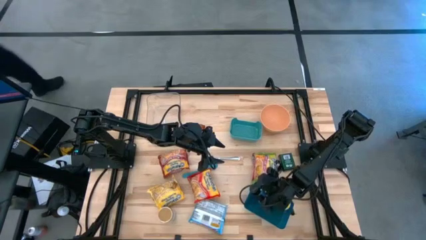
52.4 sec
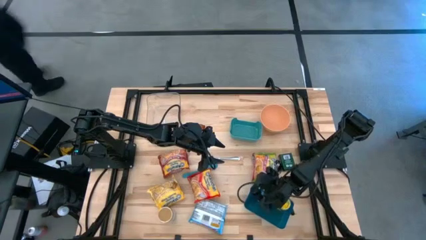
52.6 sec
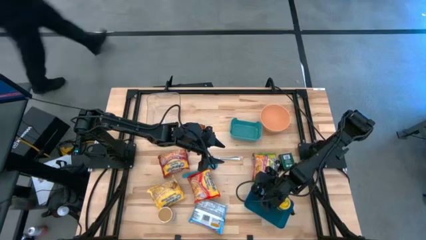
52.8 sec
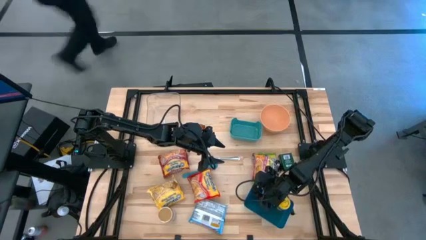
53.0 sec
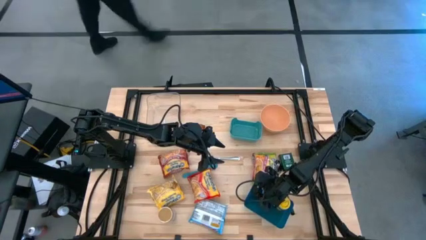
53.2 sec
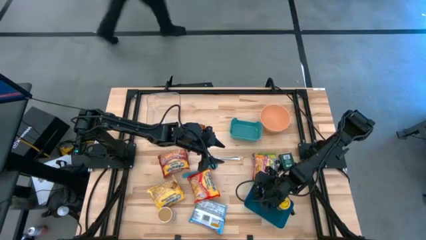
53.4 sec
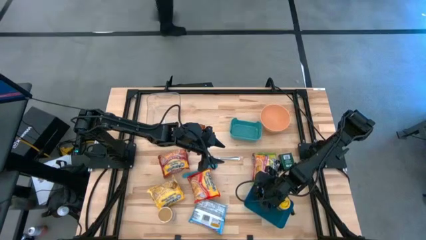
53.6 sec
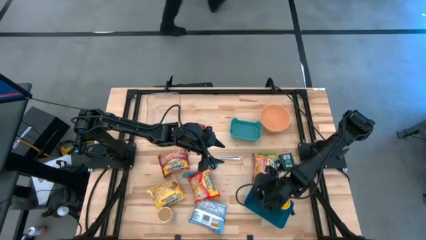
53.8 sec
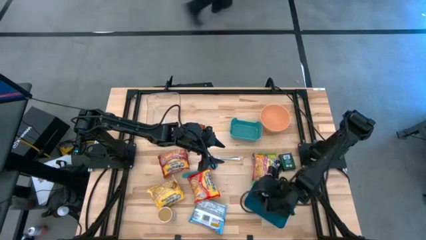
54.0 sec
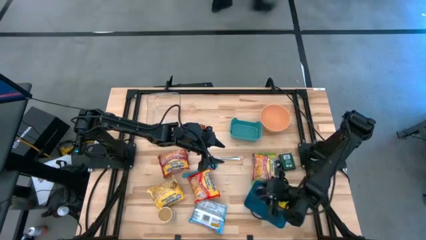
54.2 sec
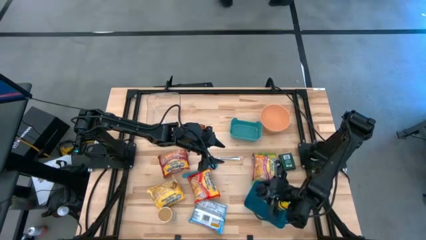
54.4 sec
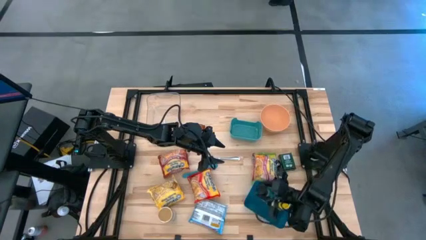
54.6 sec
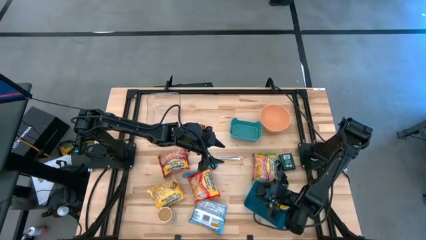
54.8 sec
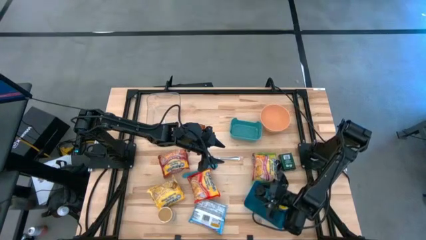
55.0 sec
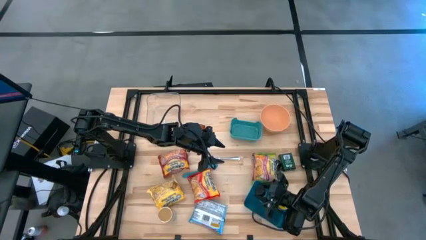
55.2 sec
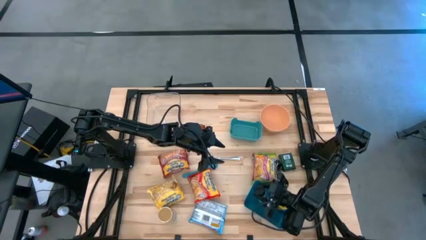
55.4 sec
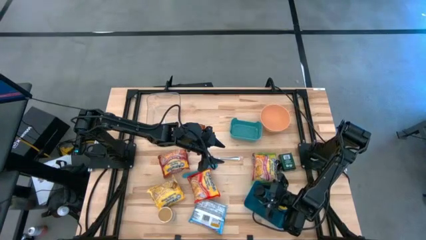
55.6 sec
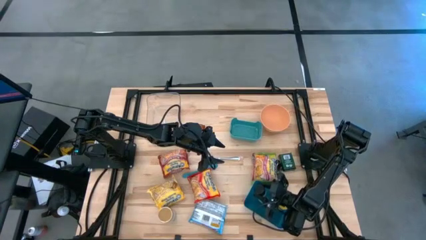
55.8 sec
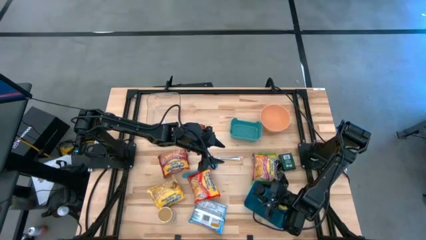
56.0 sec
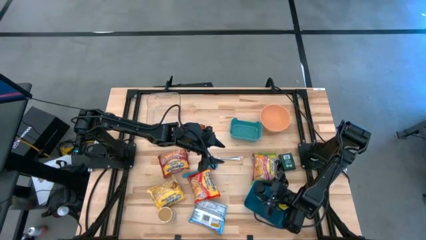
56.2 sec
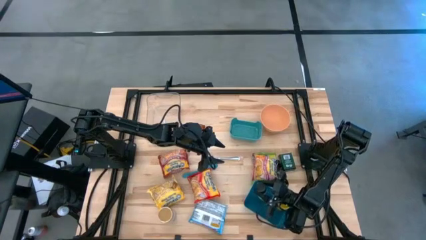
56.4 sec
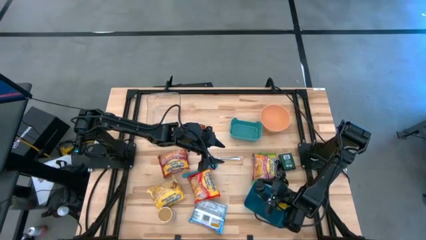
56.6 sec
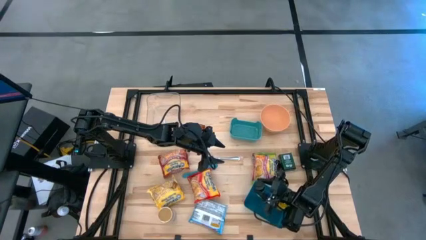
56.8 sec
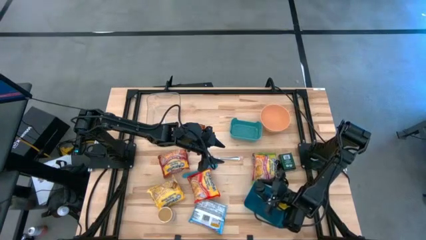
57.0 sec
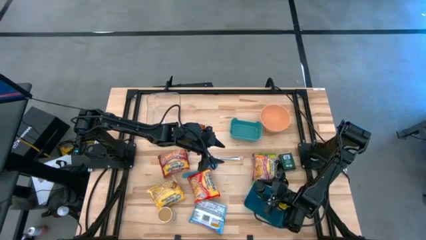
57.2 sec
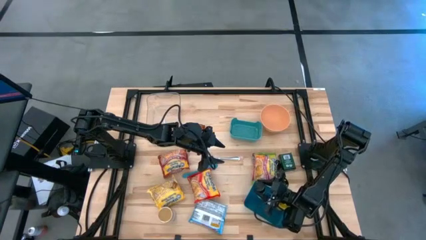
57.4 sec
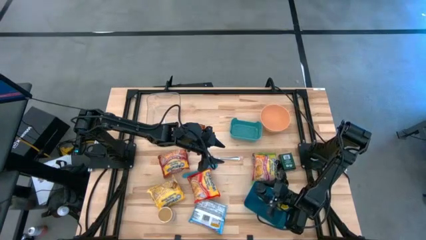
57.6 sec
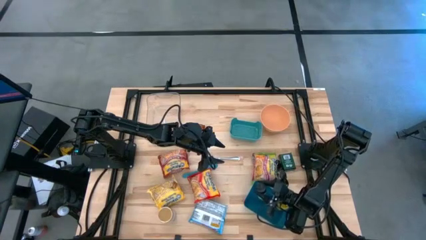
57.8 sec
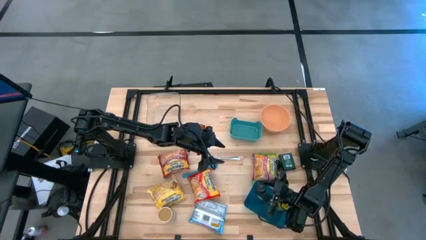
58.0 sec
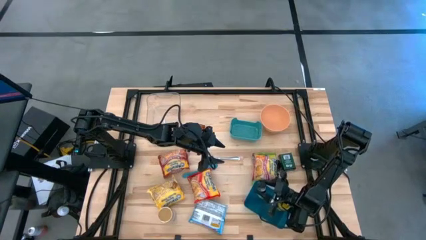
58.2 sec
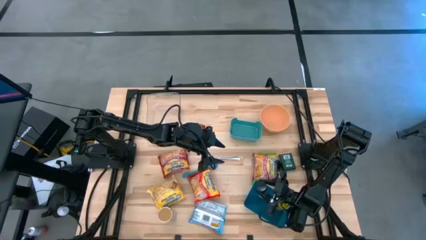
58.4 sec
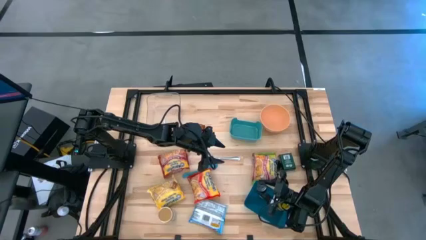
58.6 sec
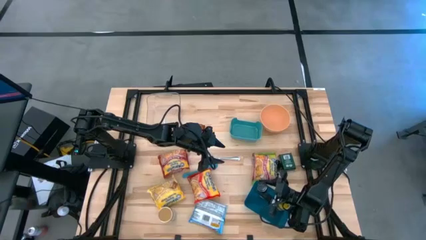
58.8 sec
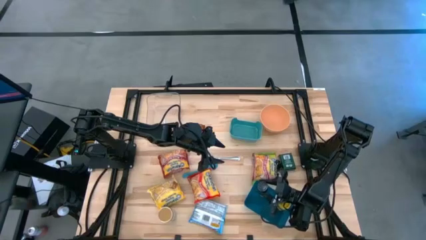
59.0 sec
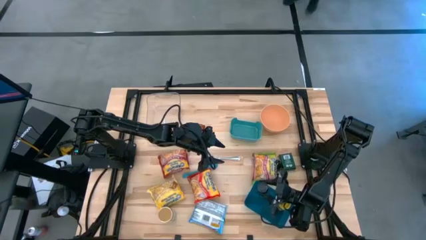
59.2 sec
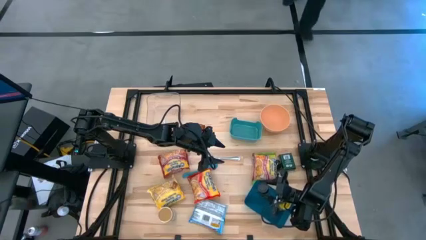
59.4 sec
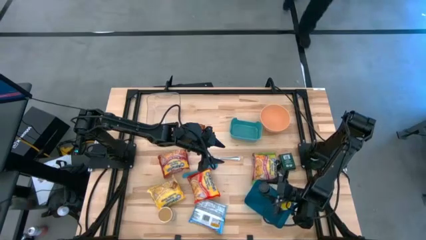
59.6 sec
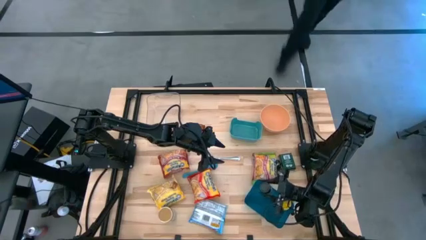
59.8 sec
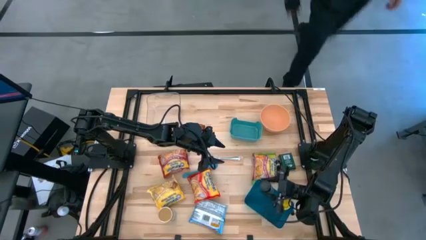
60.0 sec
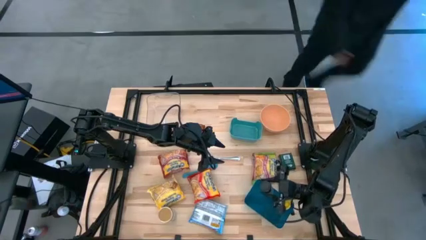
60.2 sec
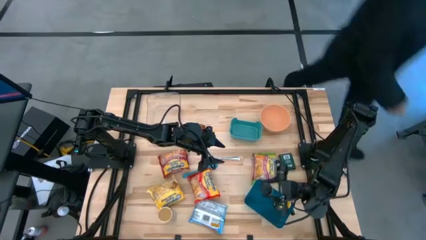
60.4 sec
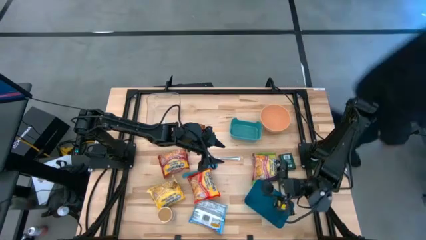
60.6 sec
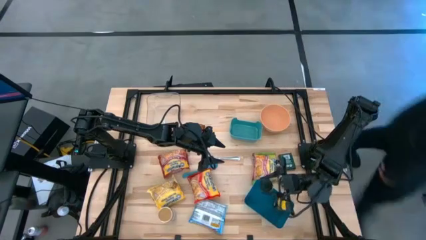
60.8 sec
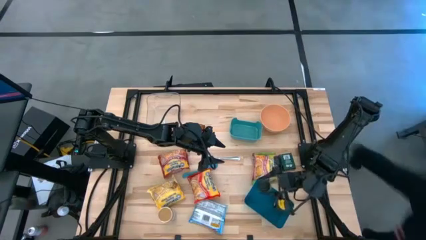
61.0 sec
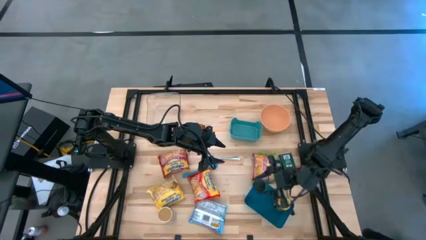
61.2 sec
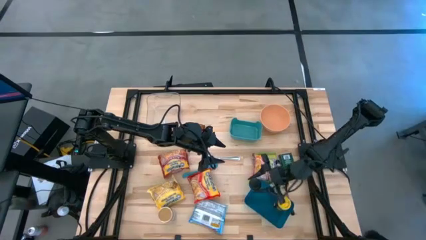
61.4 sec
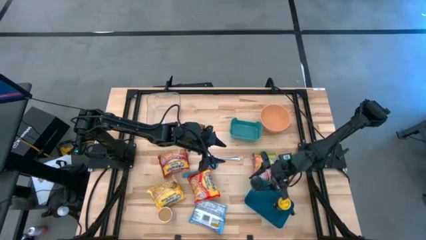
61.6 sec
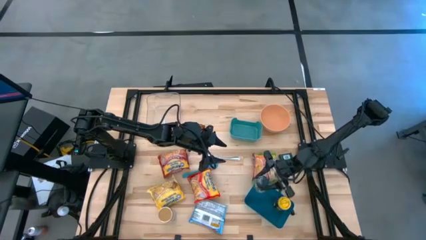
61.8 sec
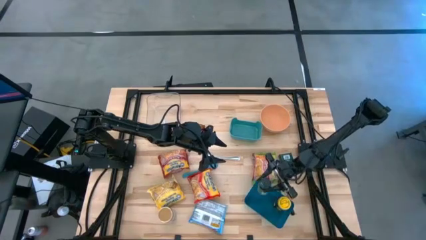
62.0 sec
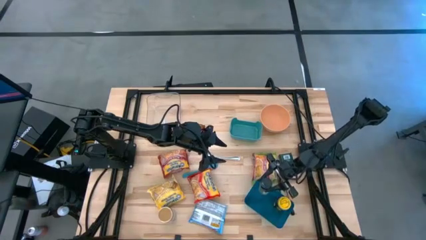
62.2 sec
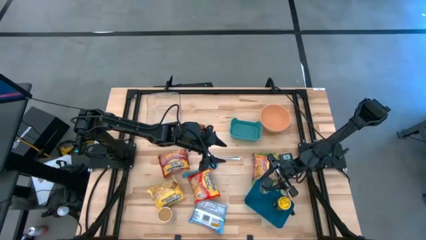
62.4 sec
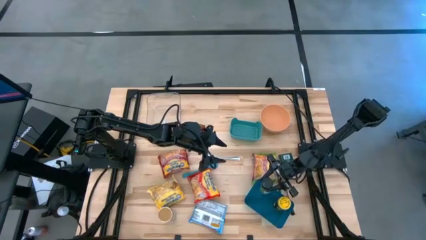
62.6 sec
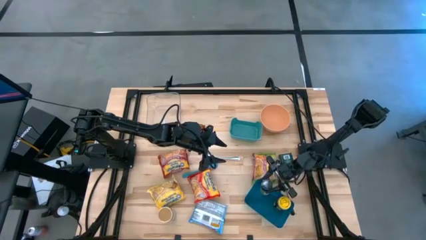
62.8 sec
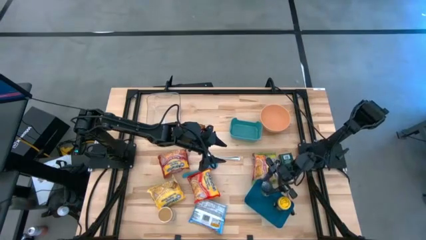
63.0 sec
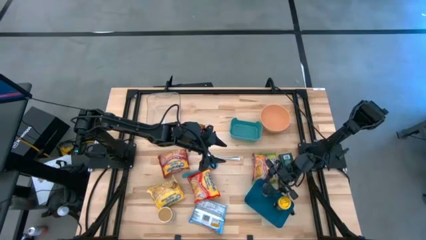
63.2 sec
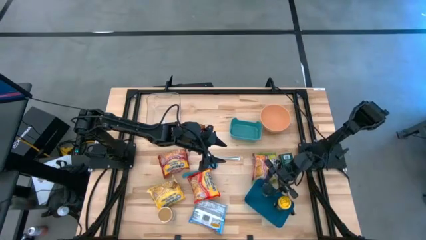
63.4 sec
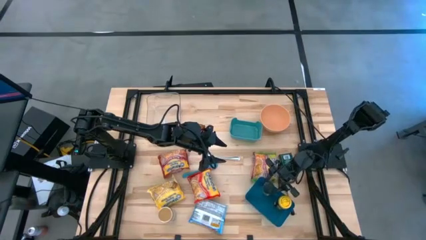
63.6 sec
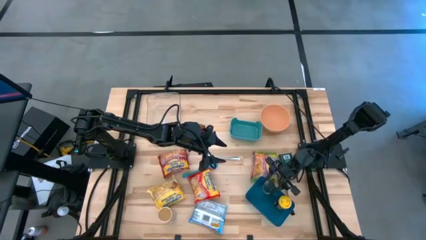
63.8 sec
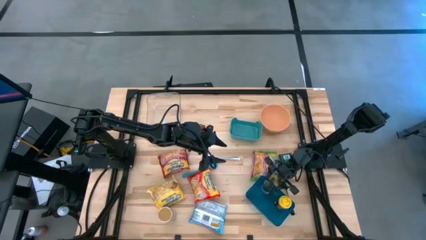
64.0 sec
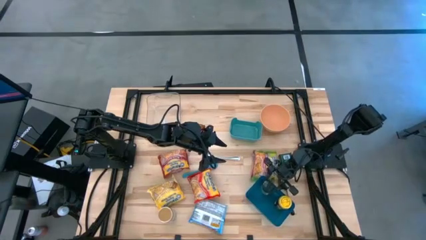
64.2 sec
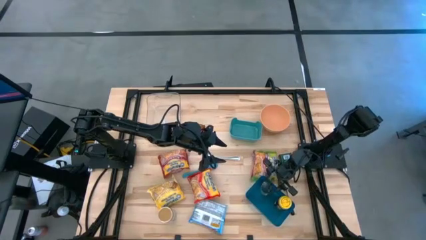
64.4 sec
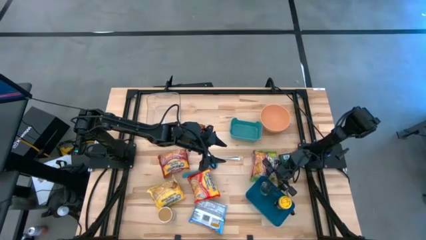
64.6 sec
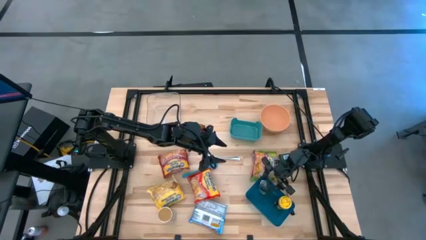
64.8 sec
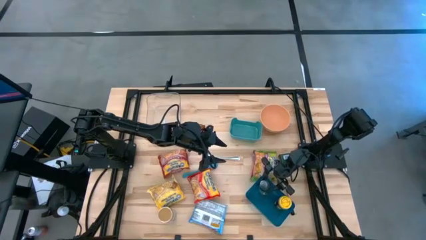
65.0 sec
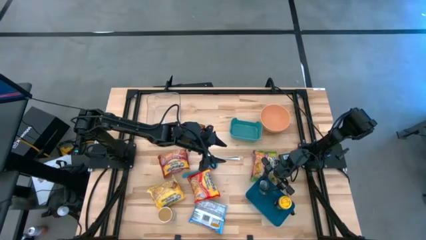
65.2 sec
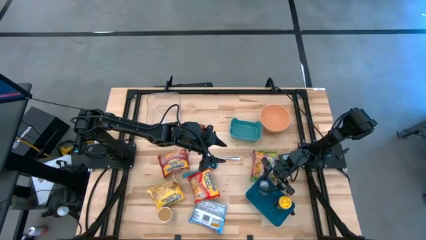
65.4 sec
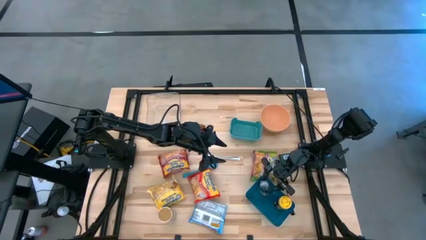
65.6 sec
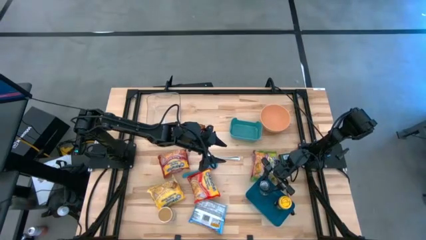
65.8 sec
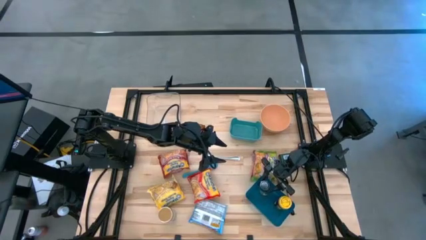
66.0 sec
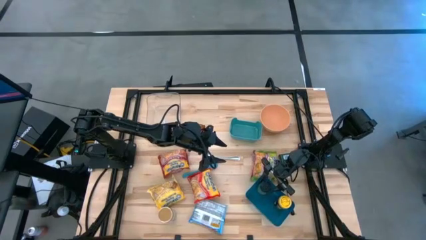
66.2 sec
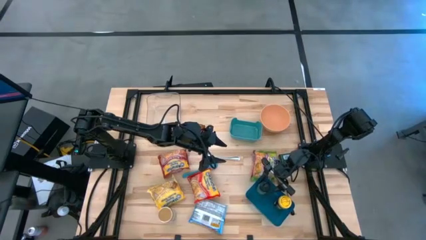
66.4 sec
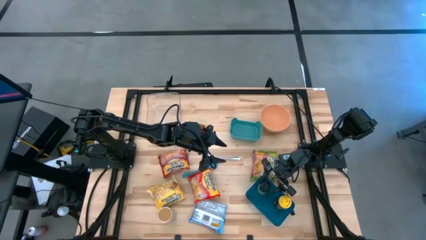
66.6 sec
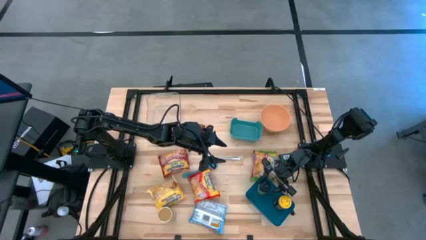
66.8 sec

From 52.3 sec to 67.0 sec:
Task: Pick & Place Food Item
Put the black seasoning bottle into the blue bin

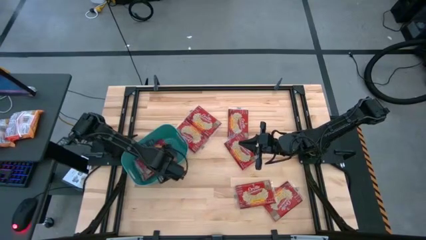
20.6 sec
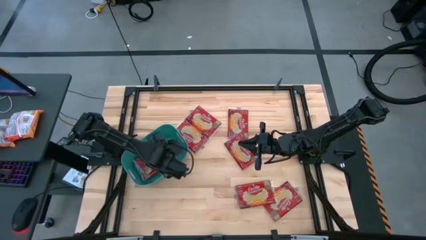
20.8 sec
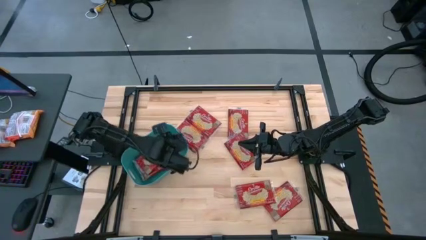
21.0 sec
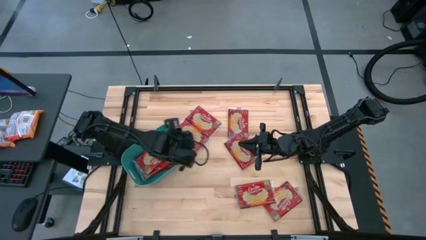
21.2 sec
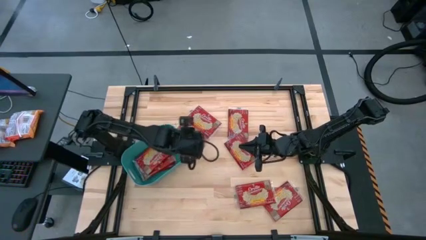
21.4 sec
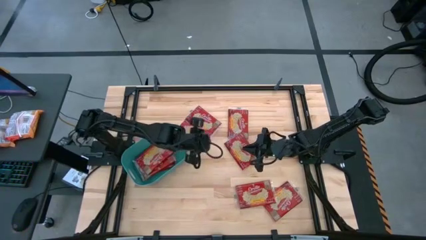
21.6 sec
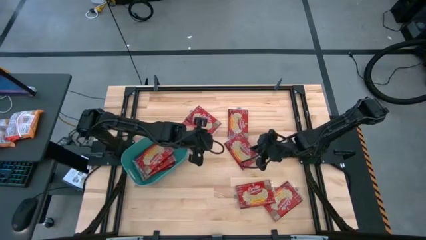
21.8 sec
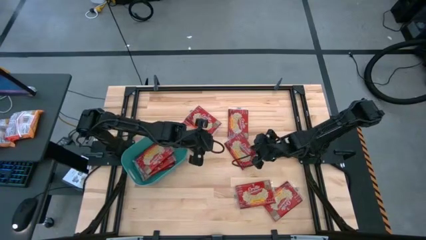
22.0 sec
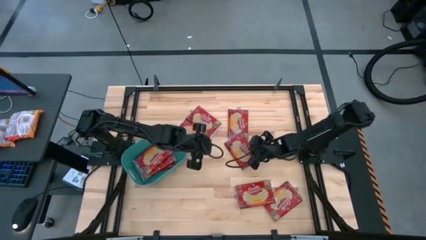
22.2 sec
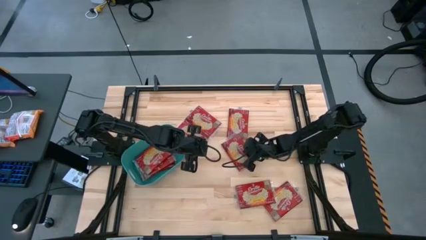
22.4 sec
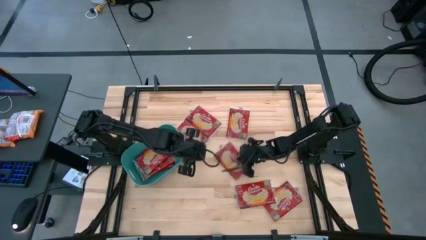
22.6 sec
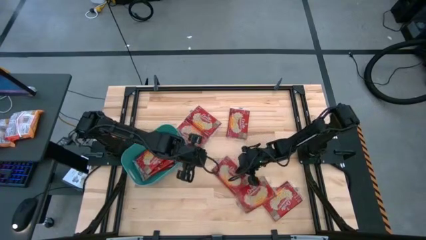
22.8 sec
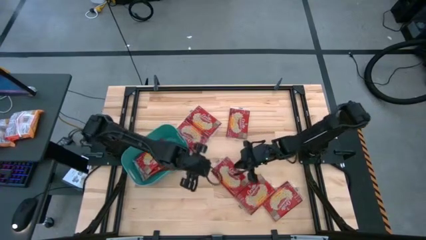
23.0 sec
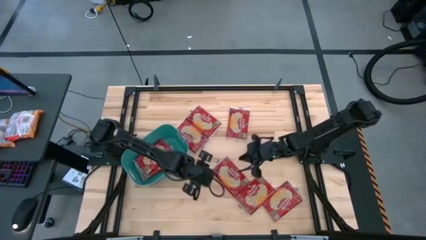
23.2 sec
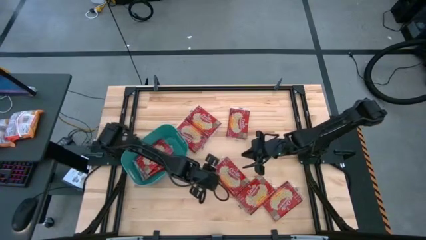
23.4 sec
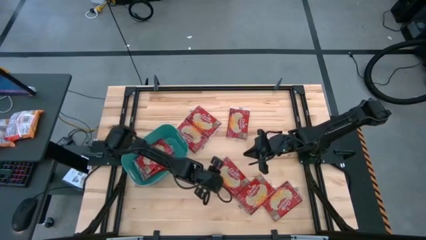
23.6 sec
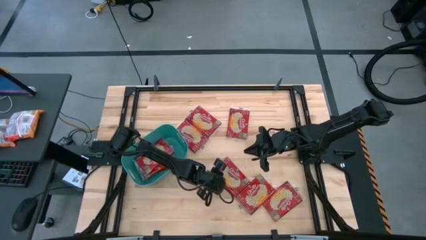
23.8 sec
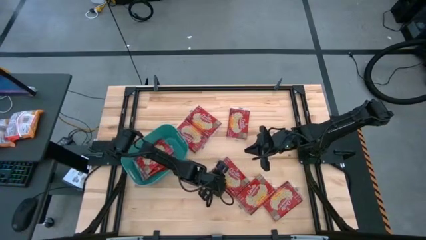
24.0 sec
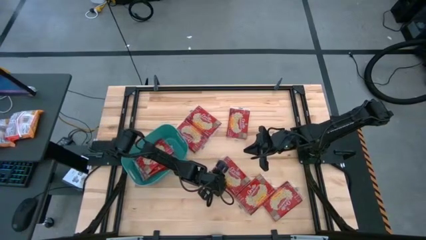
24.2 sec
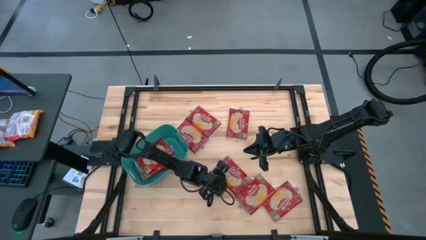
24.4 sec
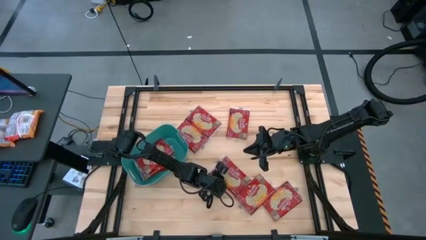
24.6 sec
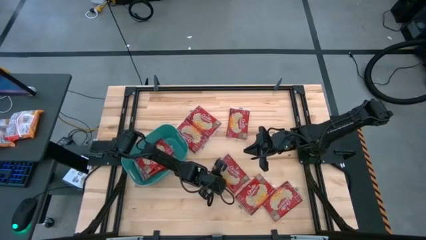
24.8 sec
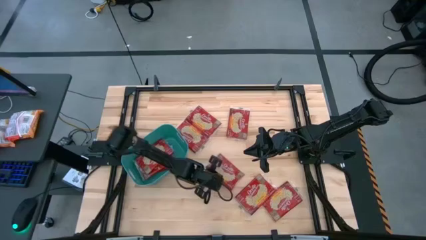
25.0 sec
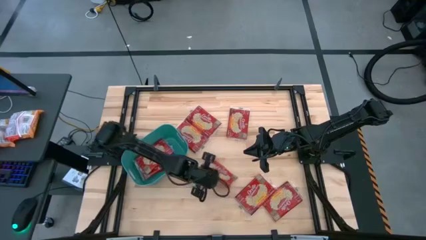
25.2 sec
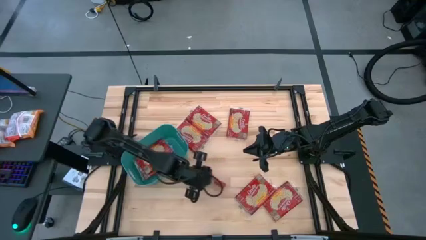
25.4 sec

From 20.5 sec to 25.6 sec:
Task: Sort popcorn bags into baskets
Put the red popcorn bag into the green bin
